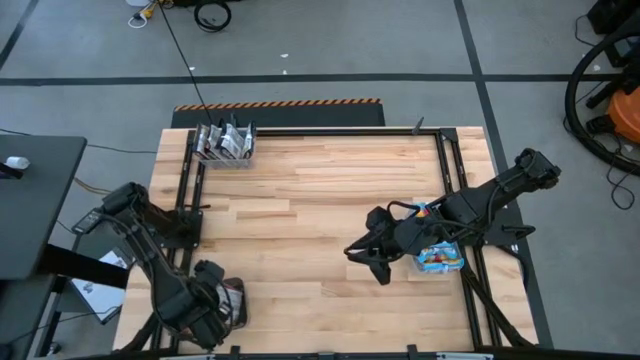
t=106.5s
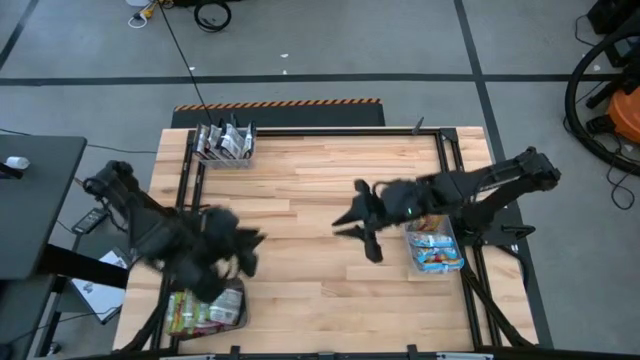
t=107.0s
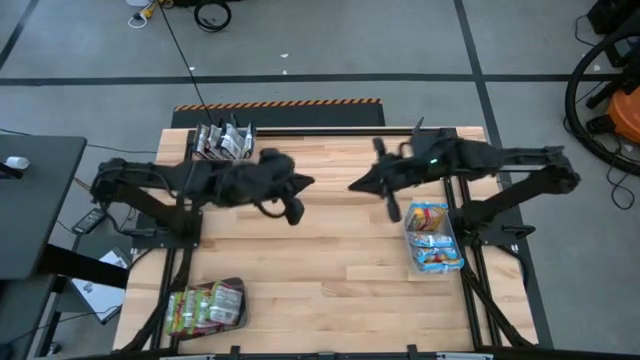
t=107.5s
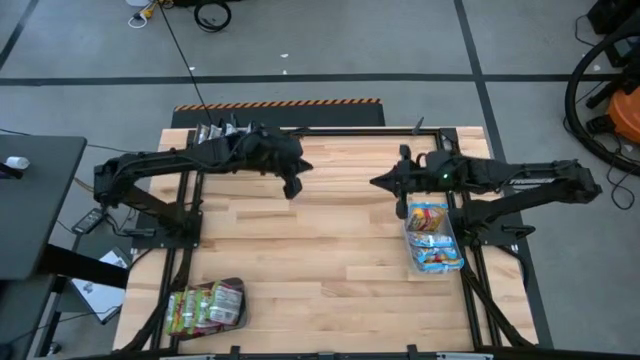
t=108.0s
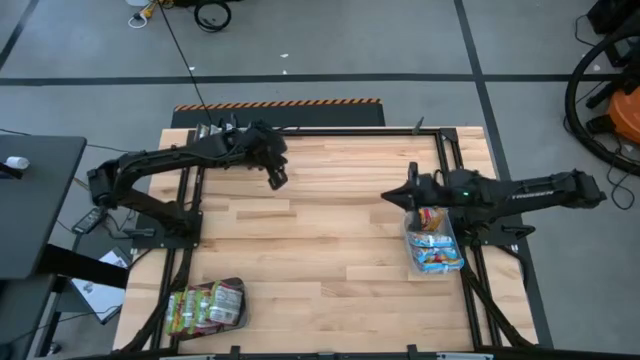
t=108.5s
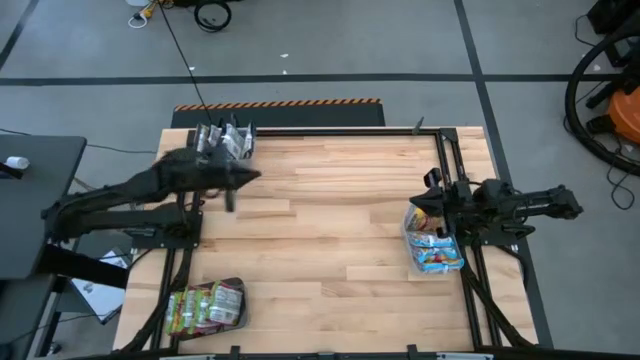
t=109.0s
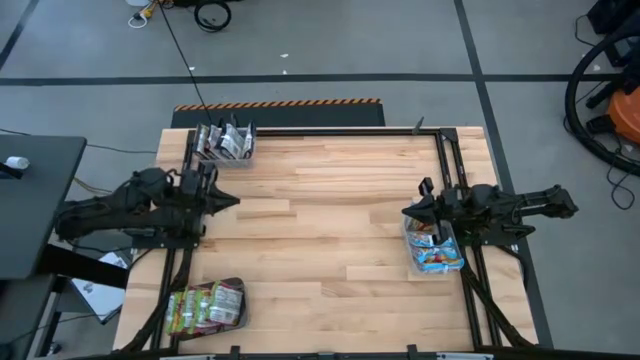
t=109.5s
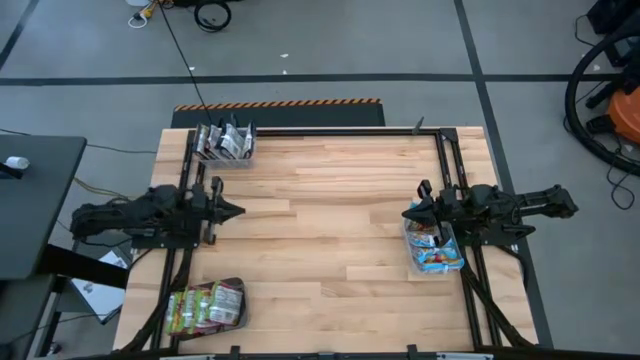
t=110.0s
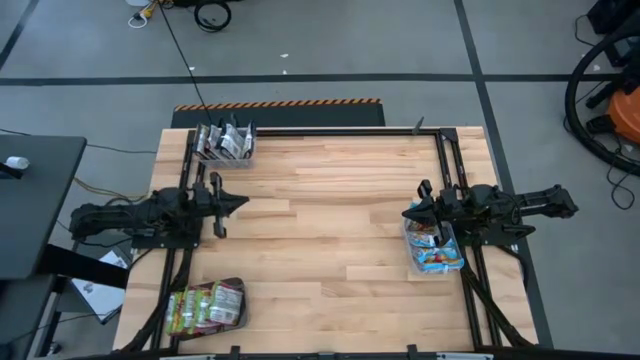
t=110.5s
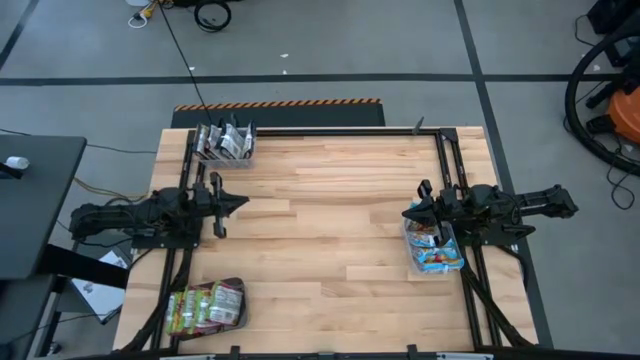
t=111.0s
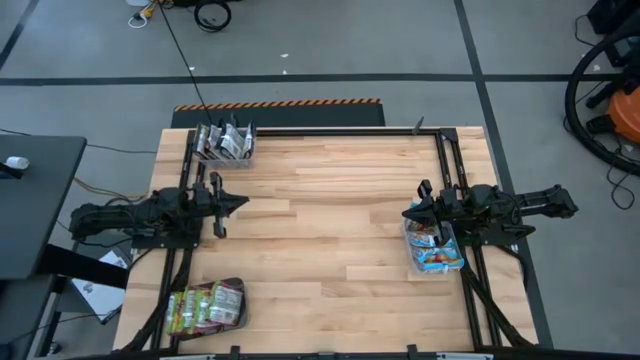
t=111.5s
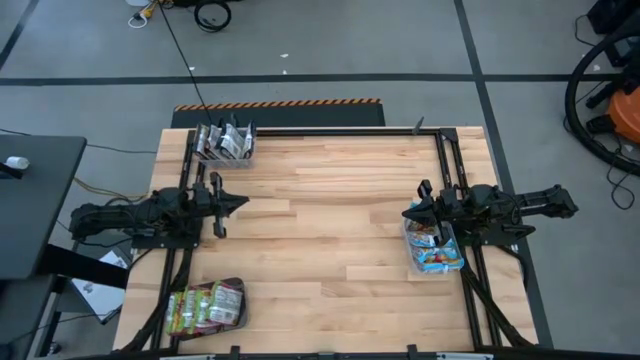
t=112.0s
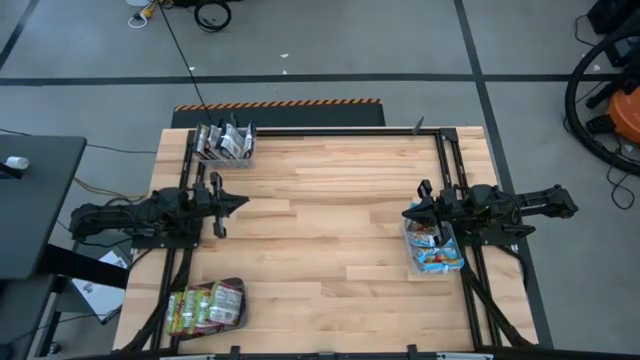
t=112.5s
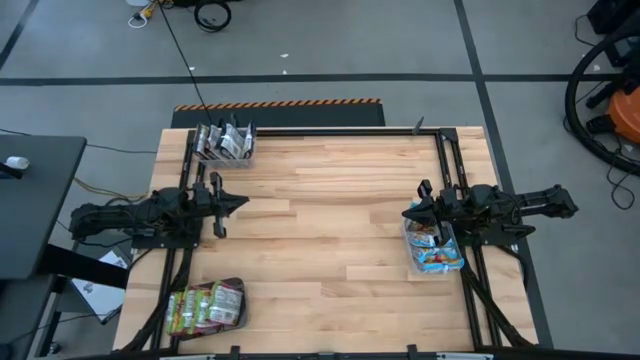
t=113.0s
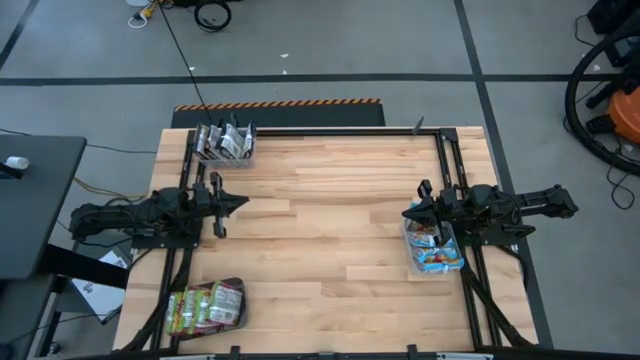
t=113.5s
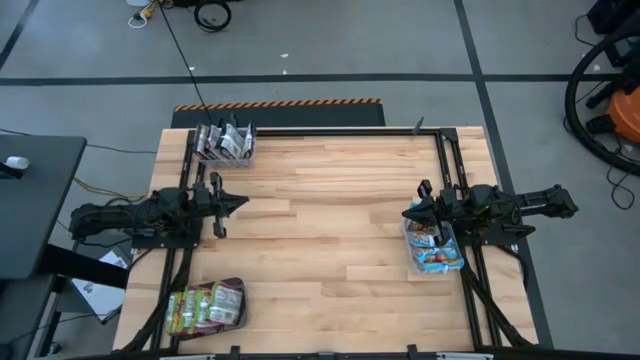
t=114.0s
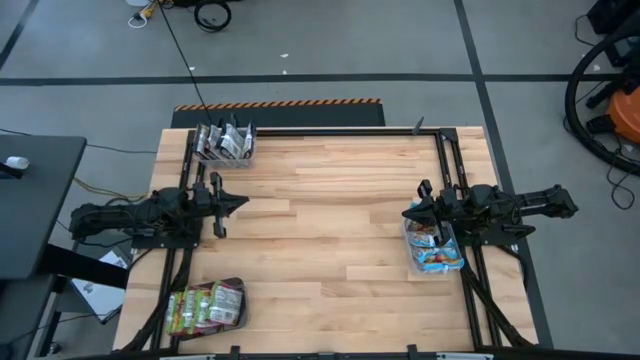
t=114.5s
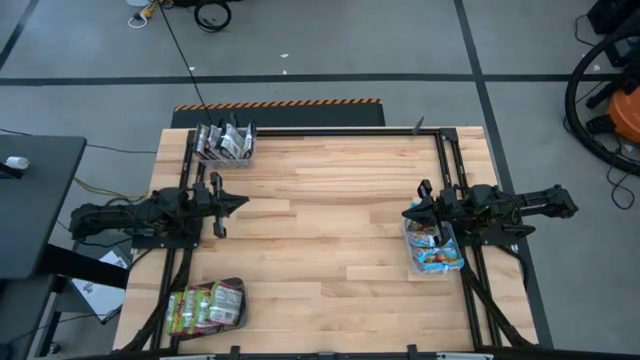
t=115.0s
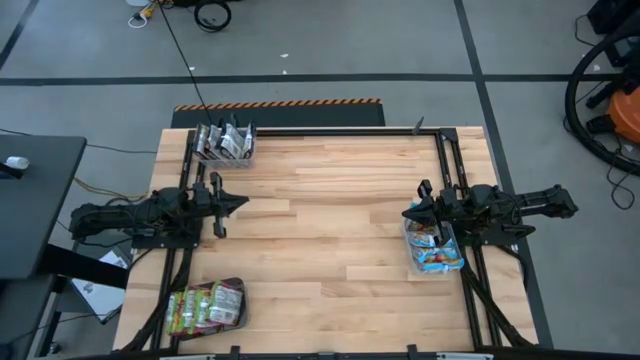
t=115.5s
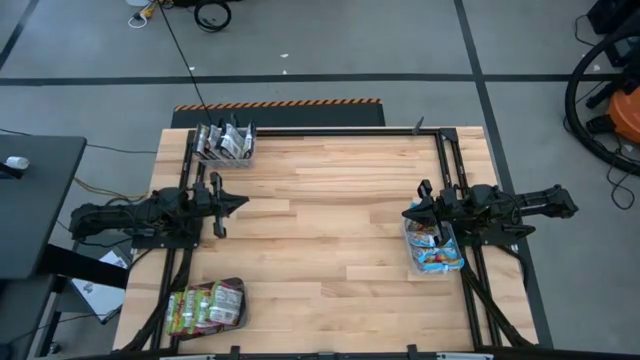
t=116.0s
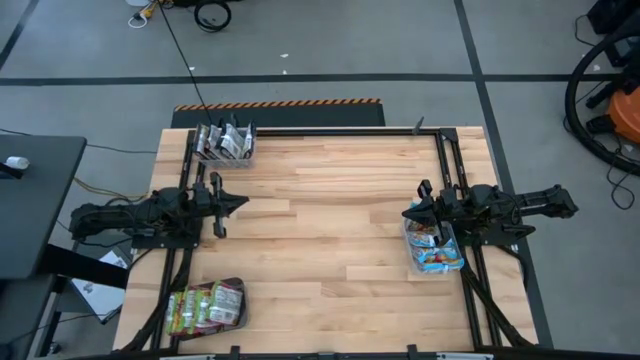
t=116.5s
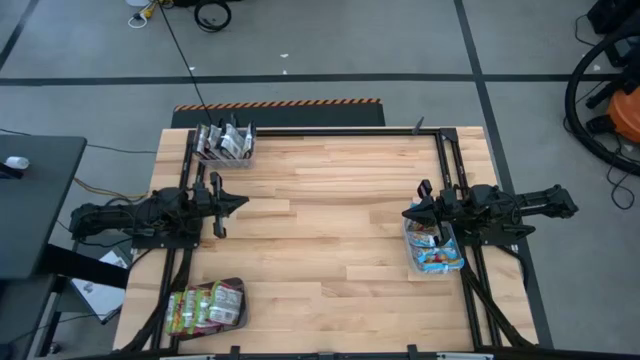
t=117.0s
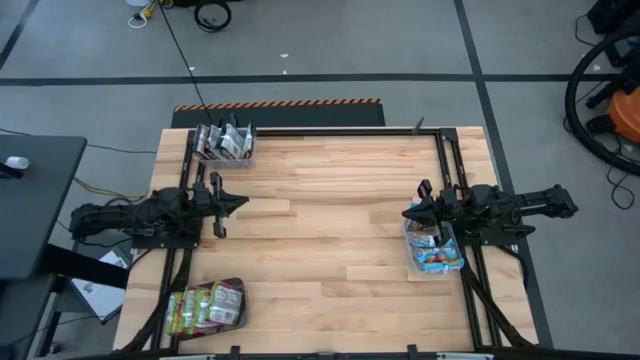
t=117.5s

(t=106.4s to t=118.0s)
Task: Sort Maruchan noodles
Return to Home Position

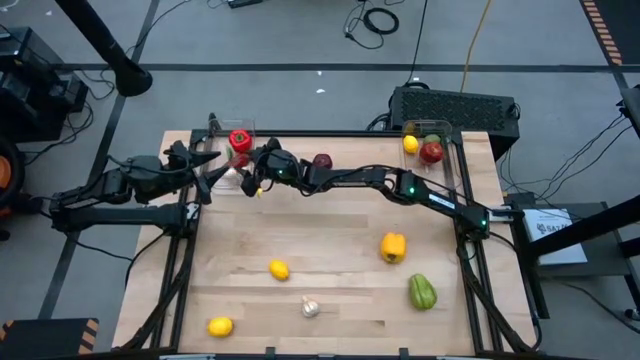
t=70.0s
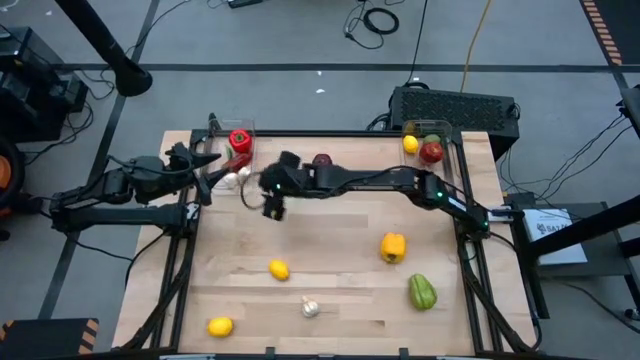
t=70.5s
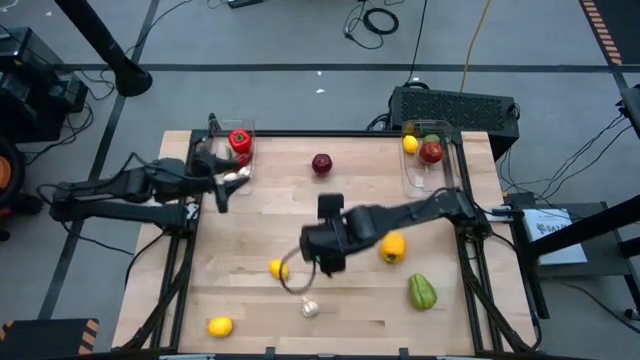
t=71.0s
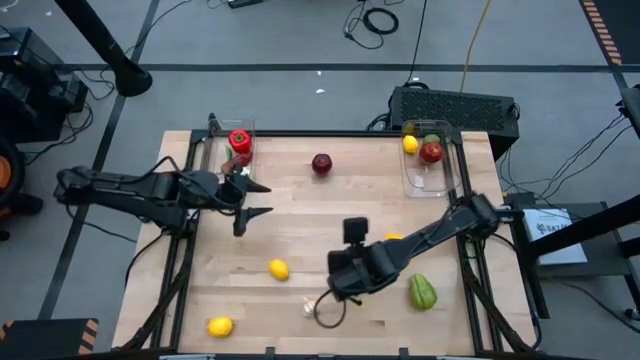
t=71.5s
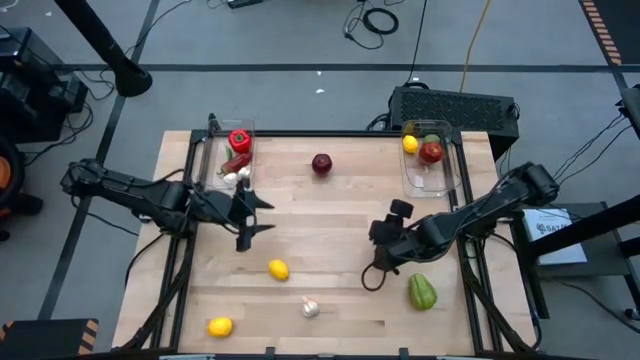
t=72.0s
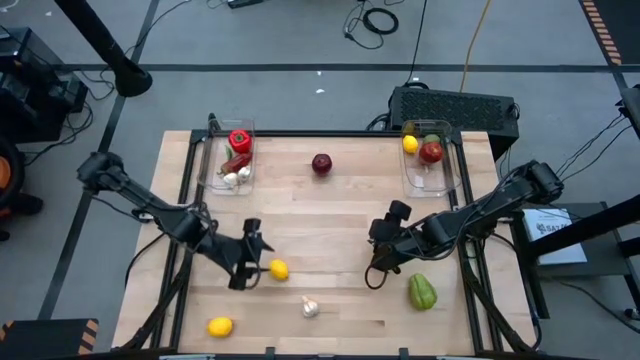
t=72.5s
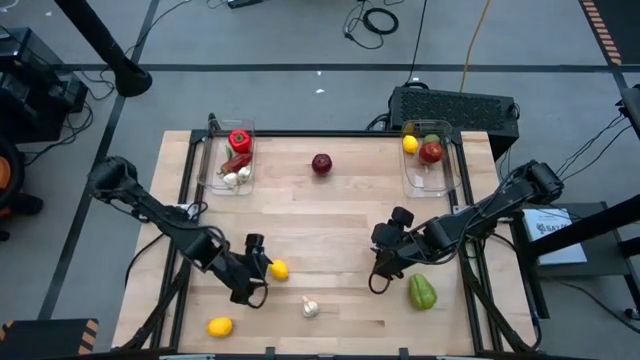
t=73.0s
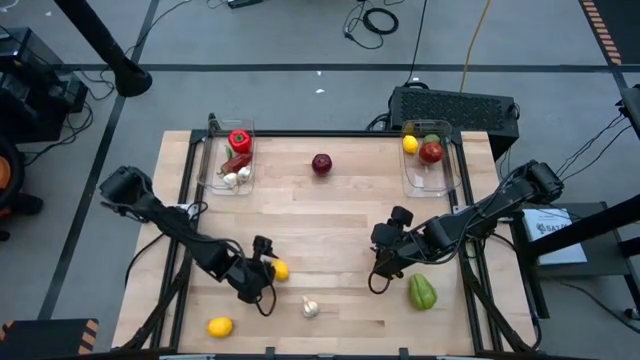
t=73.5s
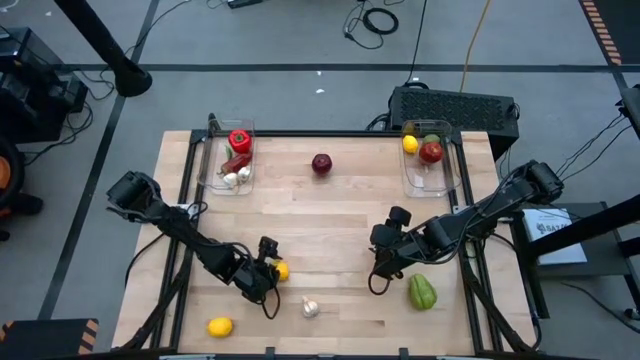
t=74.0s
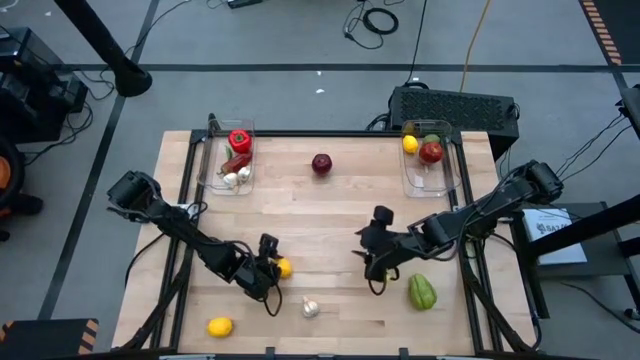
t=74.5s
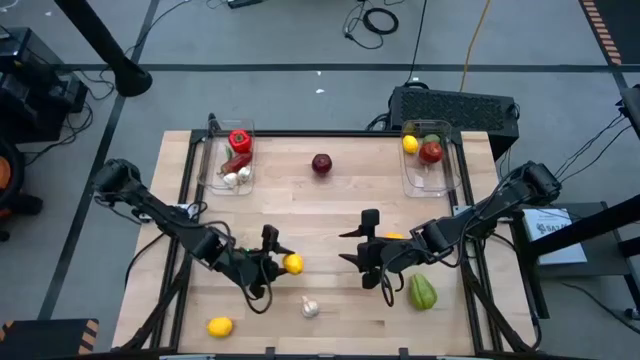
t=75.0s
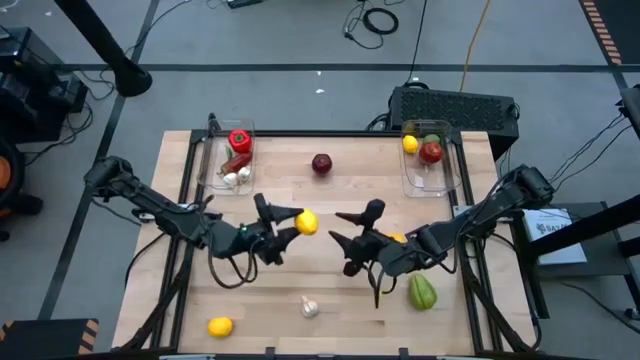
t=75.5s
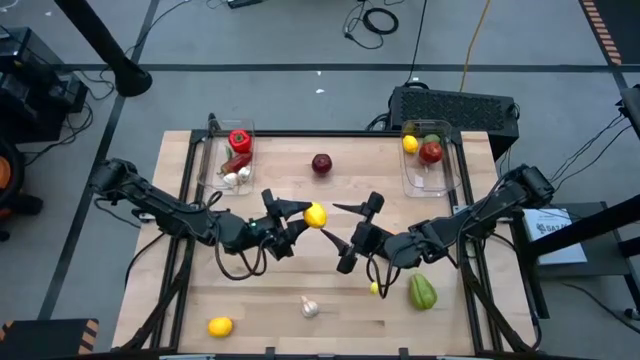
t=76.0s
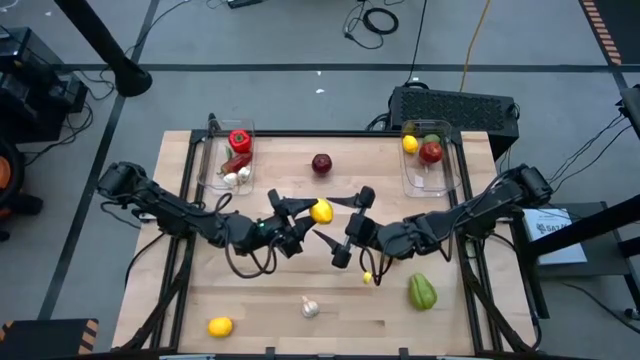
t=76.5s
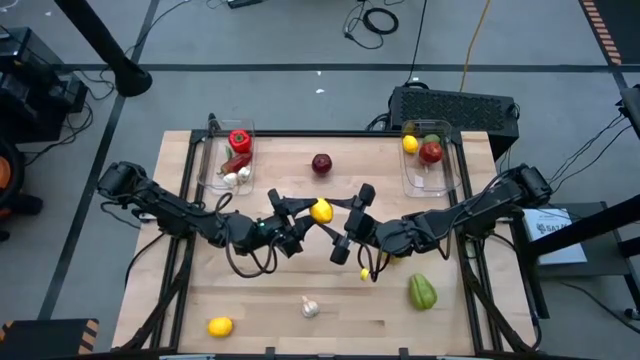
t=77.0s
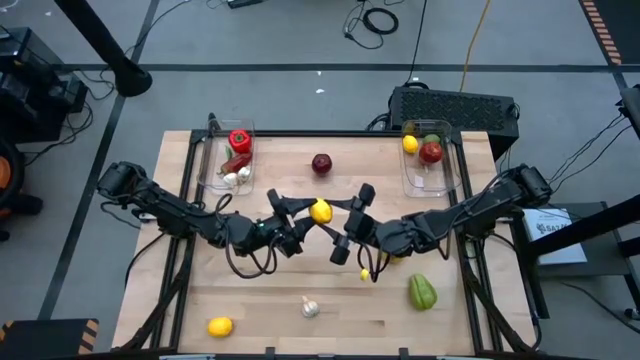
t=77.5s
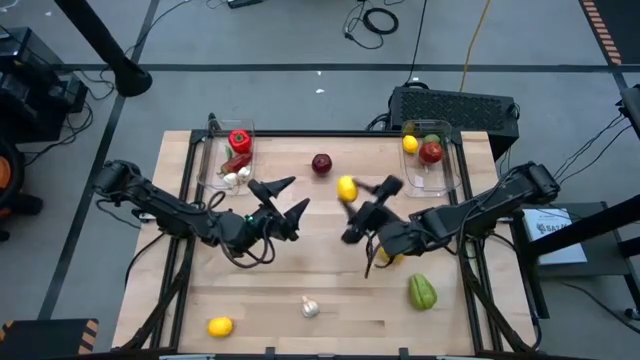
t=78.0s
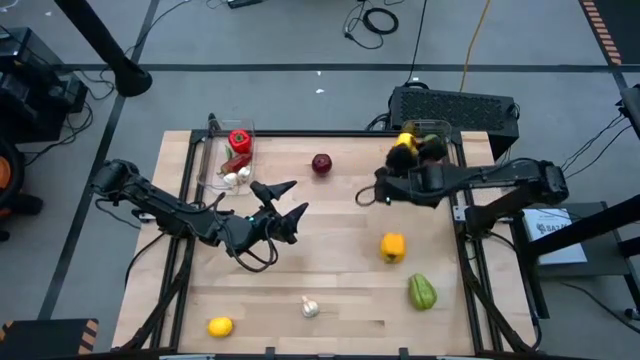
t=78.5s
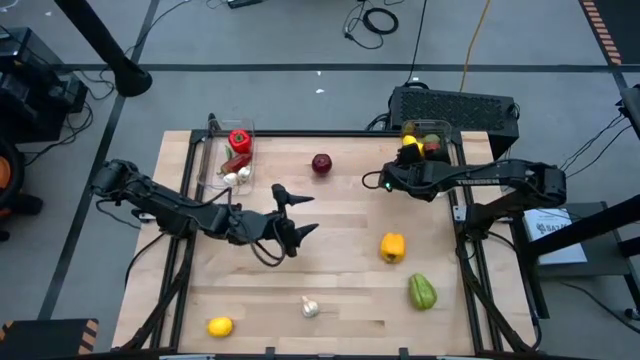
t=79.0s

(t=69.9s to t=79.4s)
Task: Sort produce into baskets
Put the top lemon into the right transparent bin
